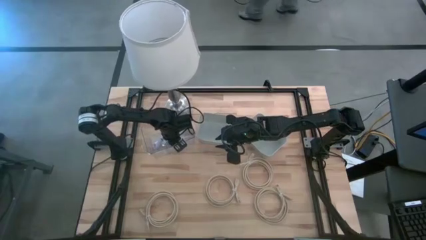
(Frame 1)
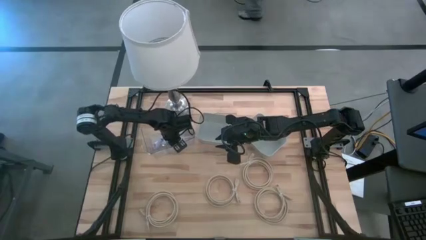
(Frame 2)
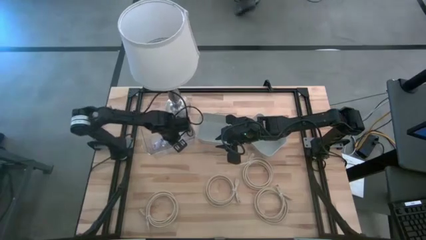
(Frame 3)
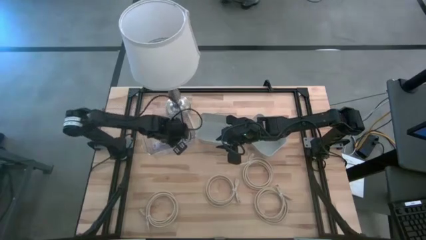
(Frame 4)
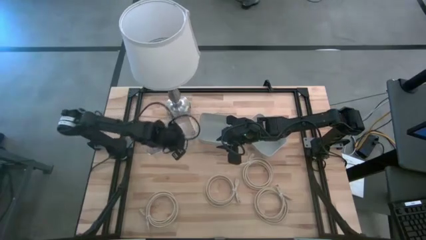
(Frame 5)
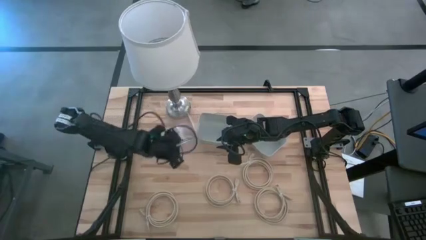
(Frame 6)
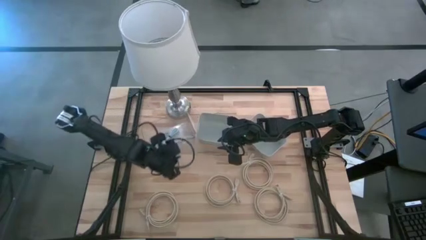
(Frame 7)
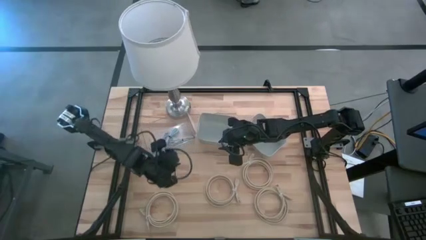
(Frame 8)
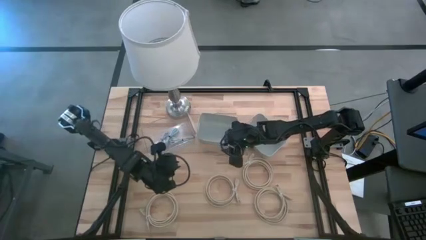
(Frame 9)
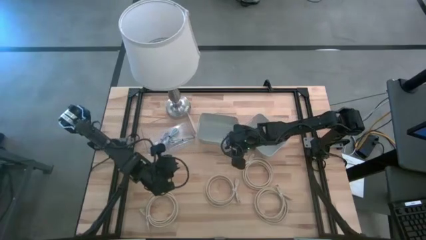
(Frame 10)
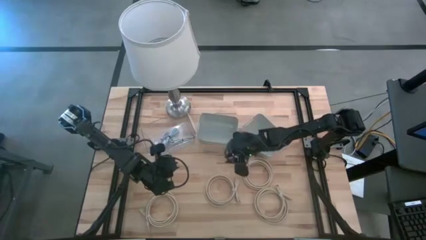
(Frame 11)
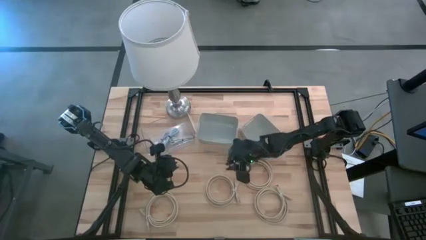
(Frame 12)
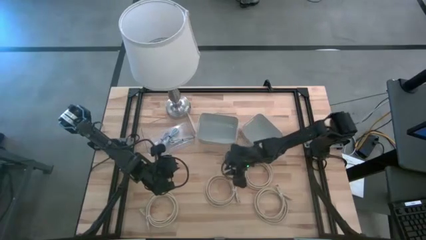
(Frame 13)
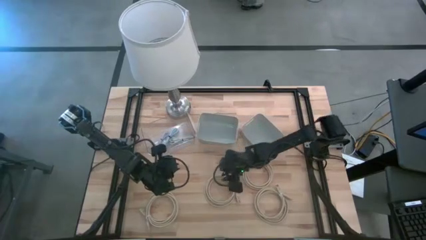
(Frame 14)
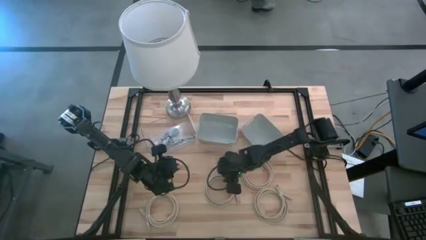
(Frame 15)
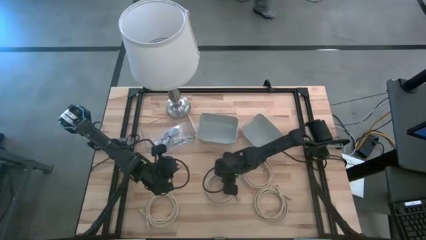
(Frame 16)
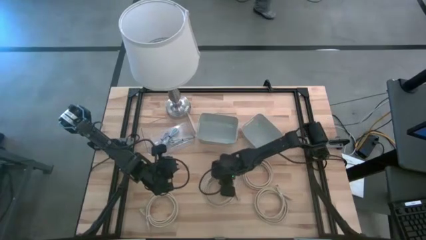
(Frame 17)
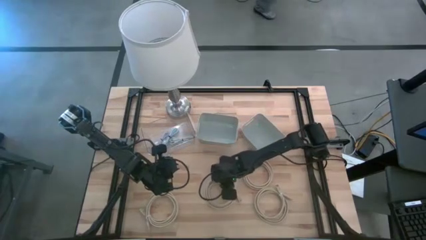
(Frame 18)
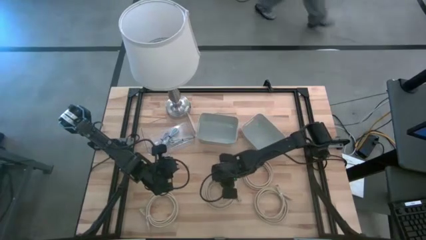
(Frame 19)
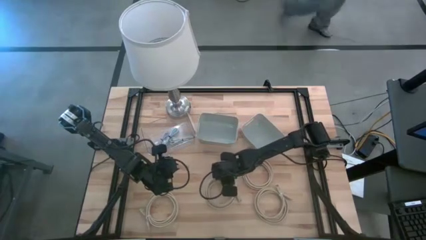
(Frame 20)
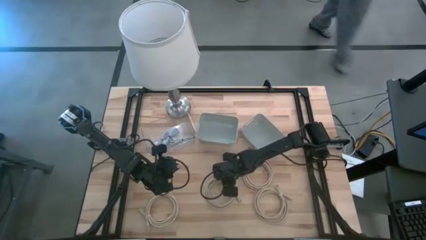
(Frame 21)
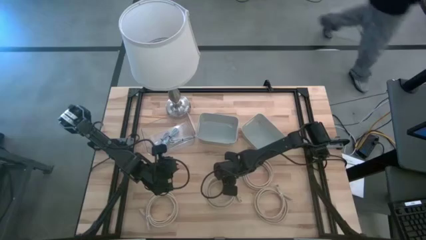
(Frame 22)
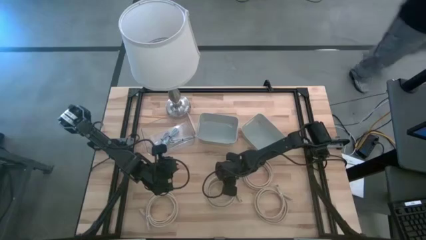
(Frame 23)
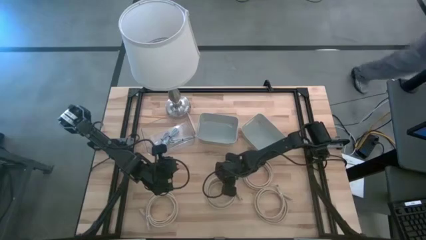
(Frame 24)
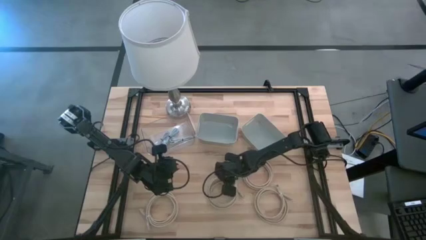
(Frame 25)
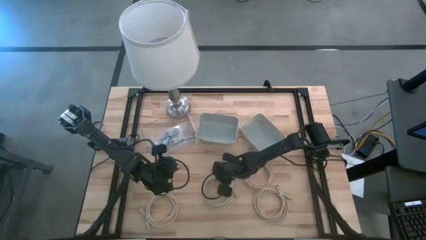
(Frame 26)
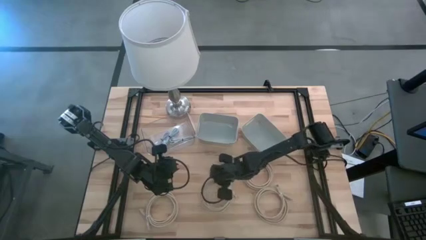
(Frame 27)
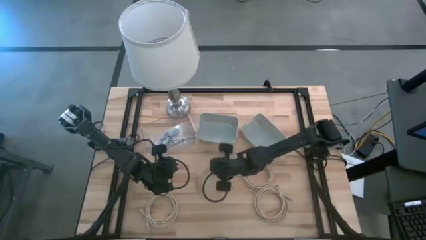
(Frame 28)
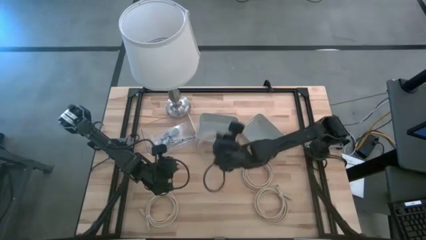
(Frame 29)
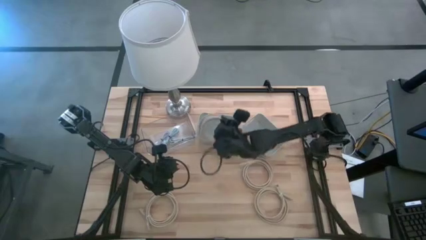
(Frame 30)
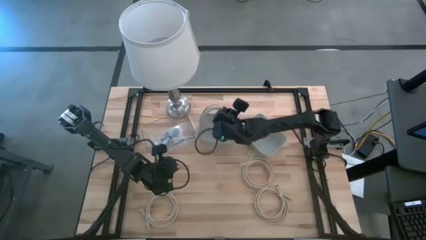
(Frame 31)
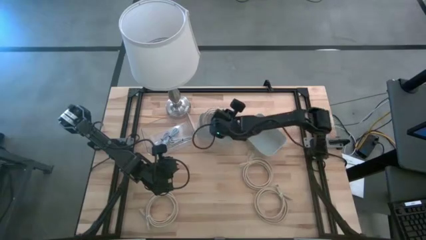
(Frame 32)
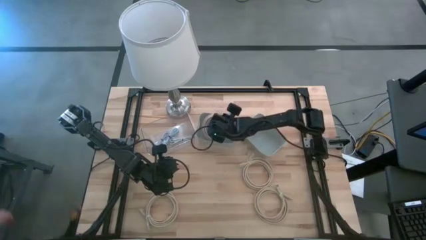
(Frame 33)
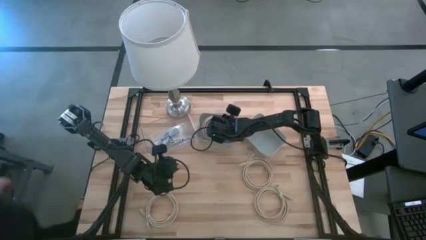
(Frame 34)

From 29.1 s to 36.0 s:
Task: Pick & Place USB Port
Put the brown hdmi cable into the left light brown bin

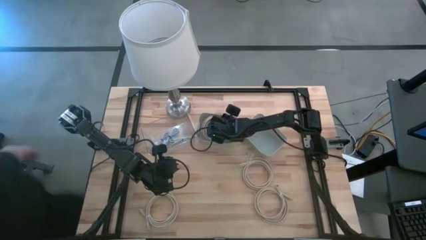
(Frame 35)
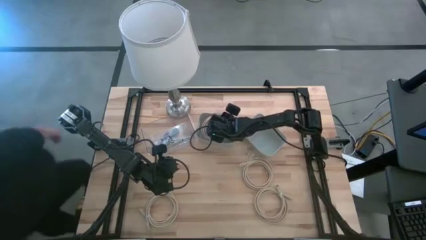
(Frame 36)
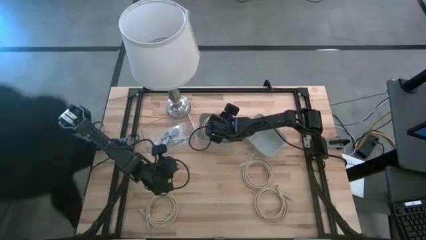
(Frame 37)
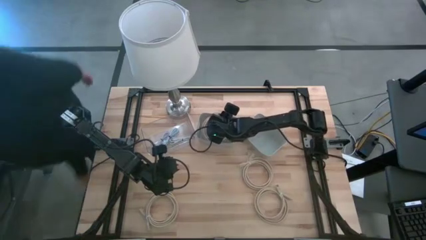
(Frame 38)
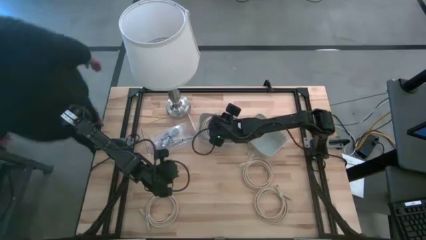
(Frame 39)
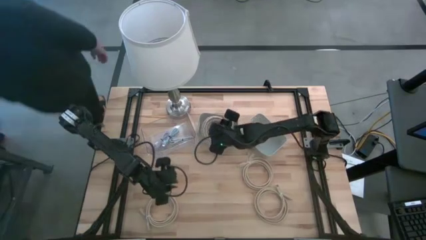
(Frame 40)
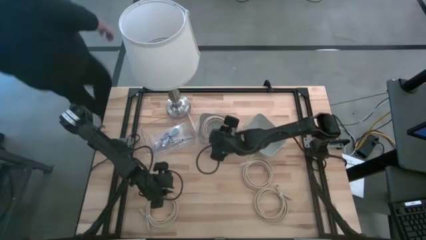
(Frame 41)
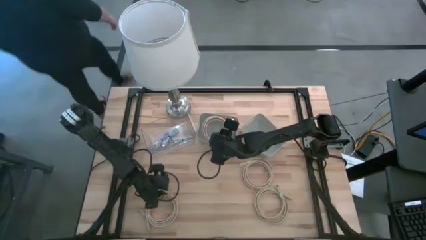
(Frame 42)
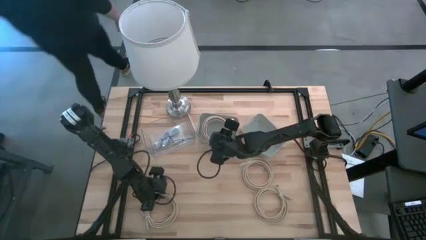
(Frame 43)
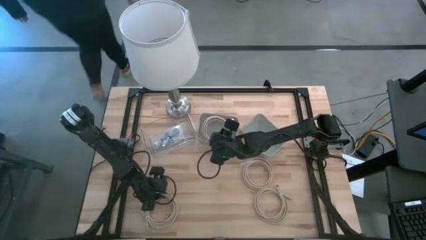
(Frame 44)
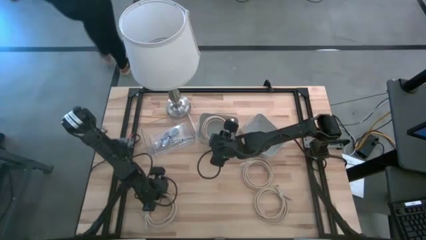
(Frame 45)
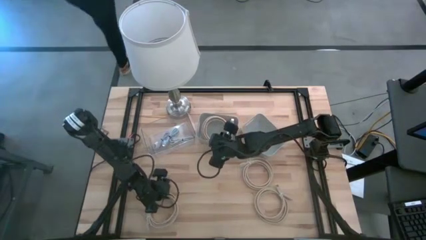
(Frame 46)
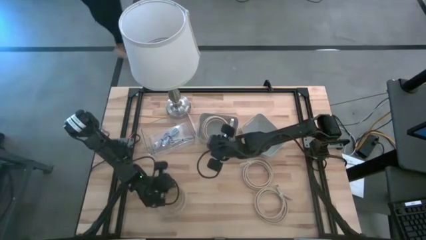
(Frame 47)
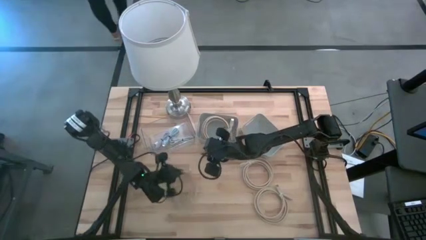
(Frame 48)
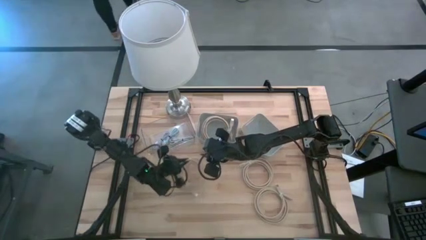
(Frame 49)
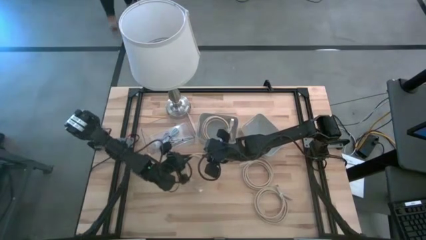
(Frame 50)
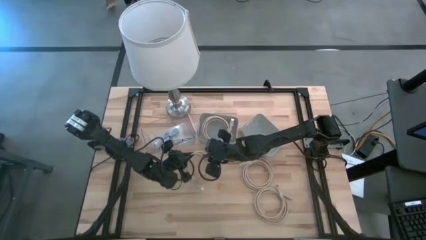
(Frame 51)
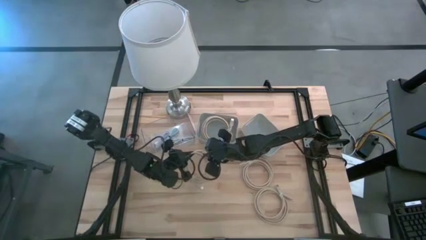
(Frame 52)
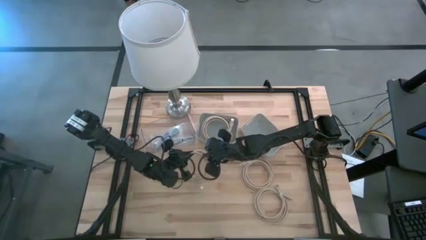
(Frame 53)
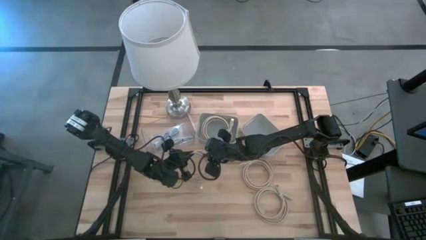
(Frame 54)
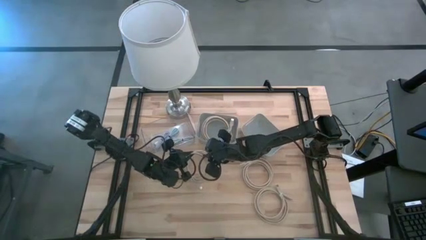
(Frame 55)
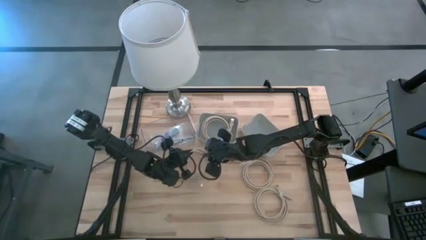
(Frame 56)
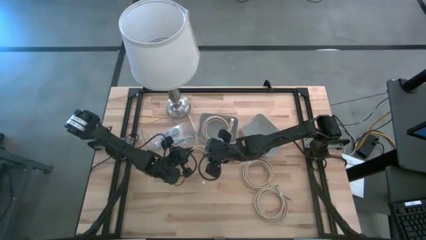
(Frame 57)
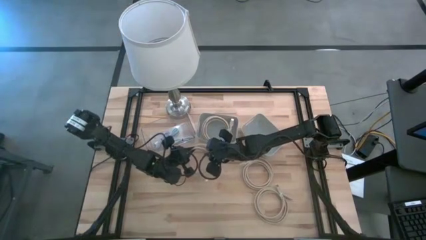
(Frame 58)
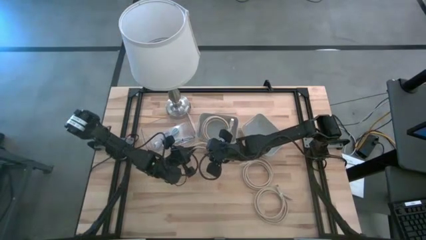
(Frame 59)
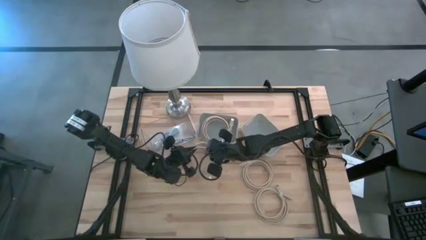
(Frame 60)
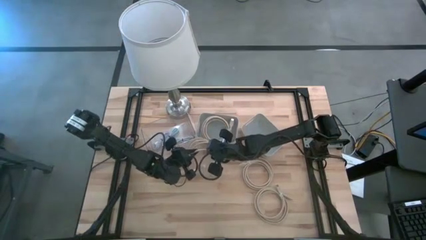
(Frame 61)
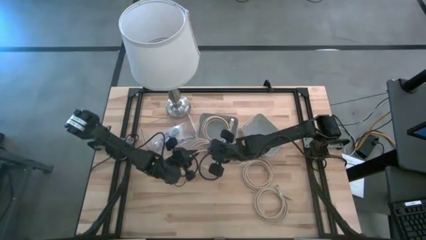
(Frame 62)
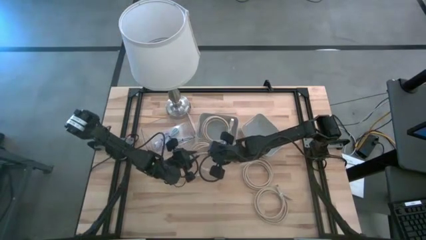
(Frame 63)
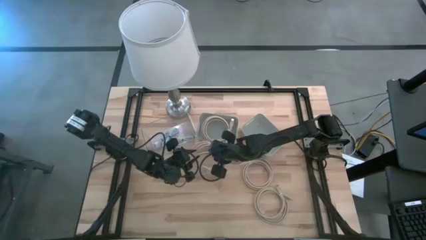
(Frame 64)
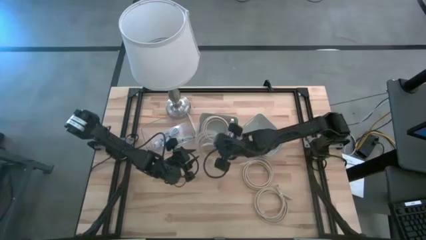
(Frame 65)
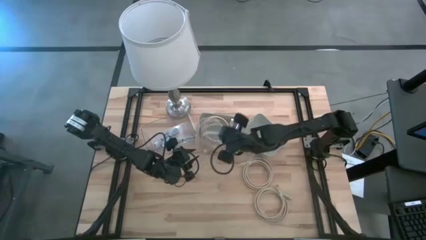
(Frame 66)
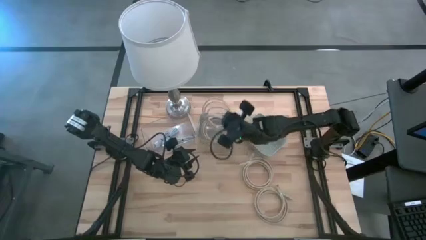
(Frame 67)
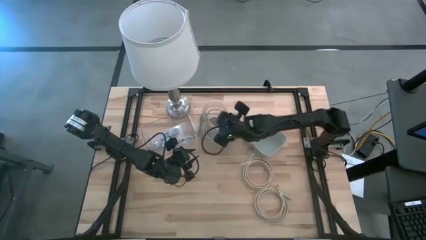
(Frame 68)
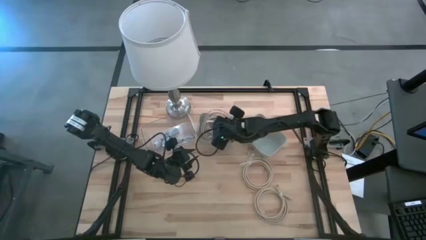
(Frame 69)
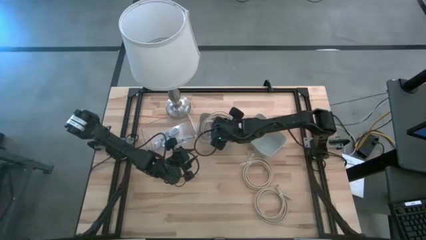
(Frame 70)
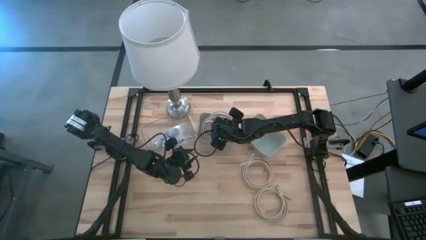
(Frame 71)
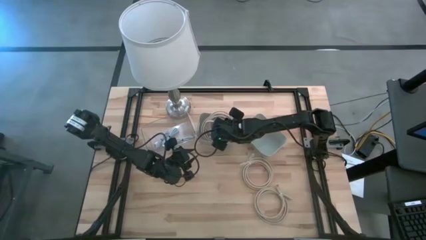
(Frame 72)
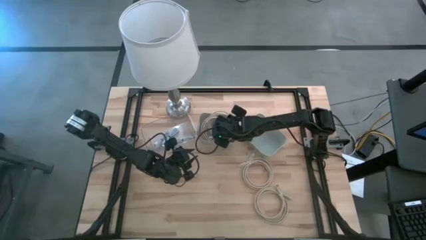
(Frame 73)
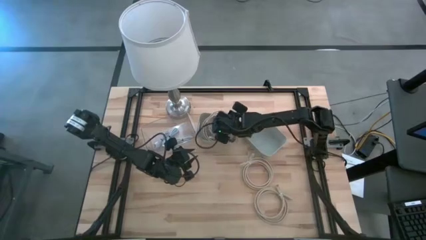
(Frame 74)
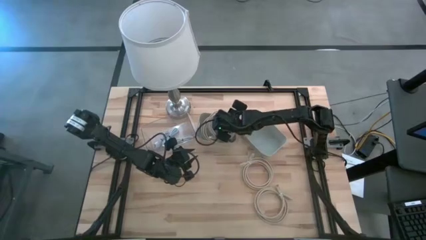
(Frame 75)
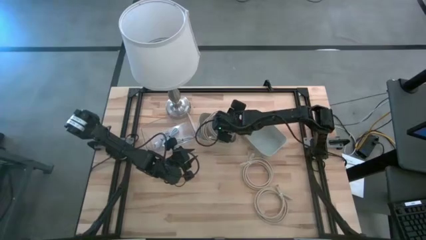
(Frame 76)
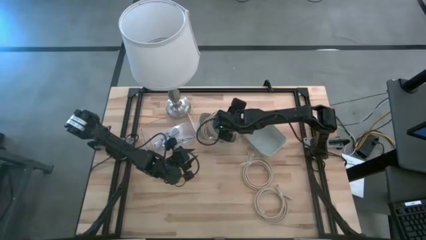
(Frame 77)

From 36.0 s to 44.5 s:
Put the brown hdmi cable into the left light brown bin
